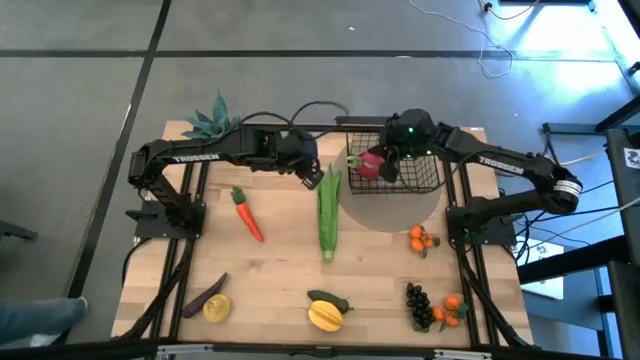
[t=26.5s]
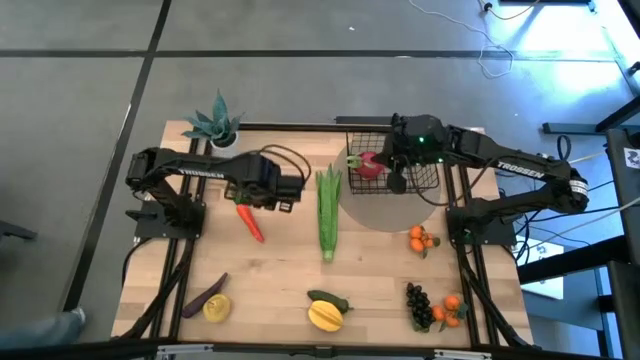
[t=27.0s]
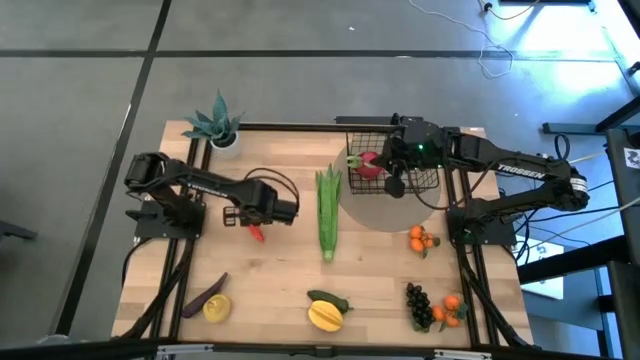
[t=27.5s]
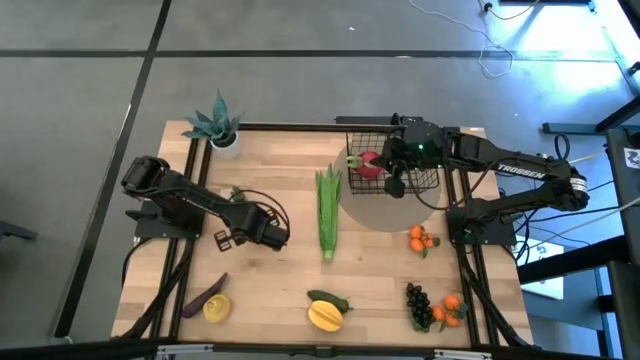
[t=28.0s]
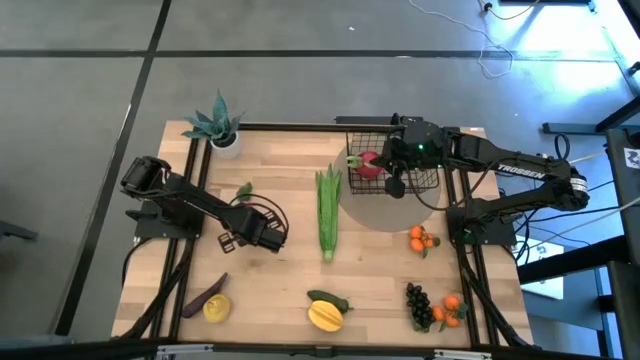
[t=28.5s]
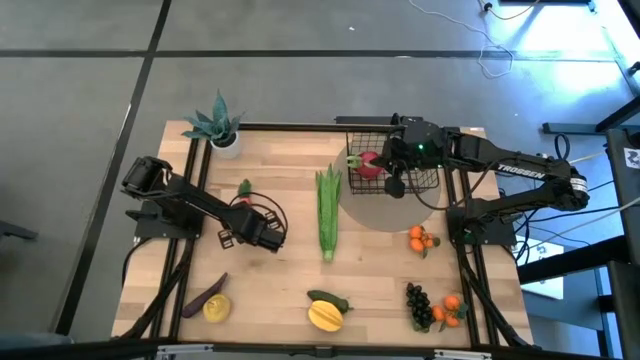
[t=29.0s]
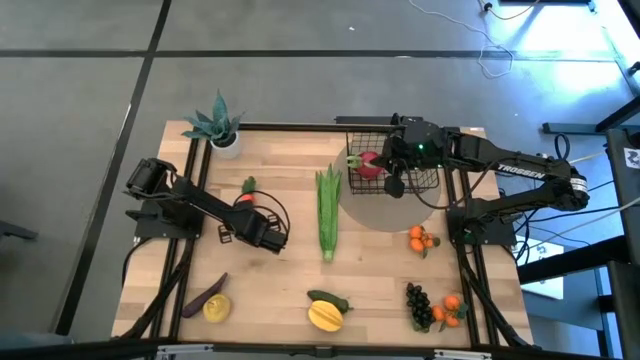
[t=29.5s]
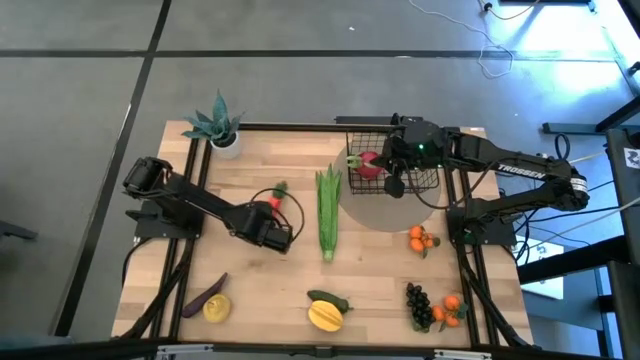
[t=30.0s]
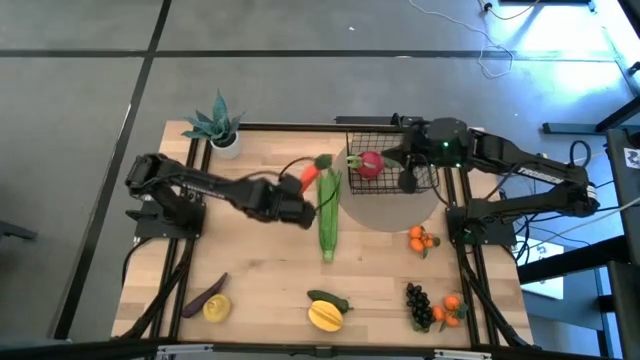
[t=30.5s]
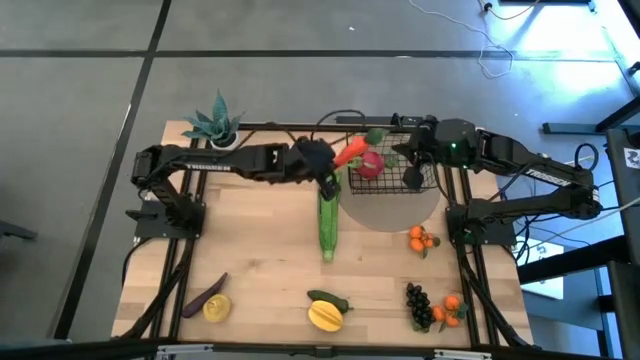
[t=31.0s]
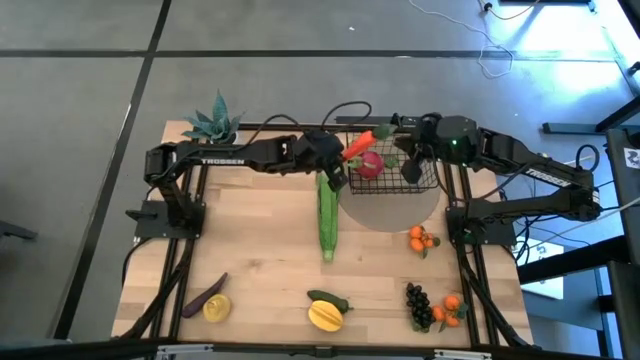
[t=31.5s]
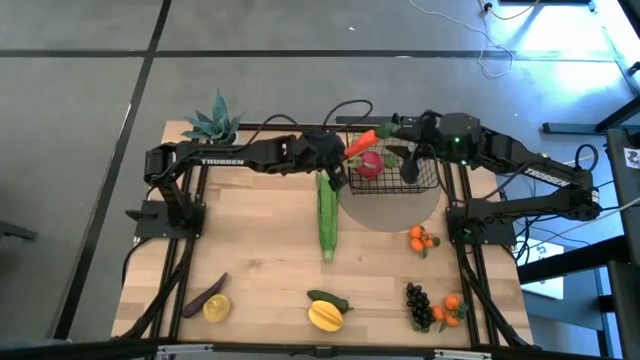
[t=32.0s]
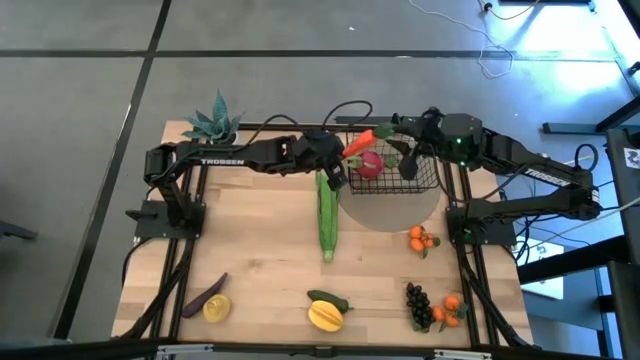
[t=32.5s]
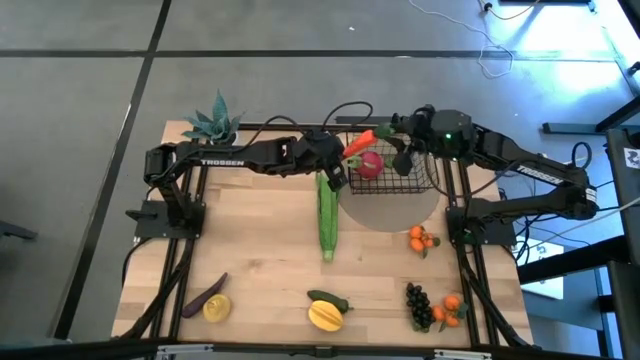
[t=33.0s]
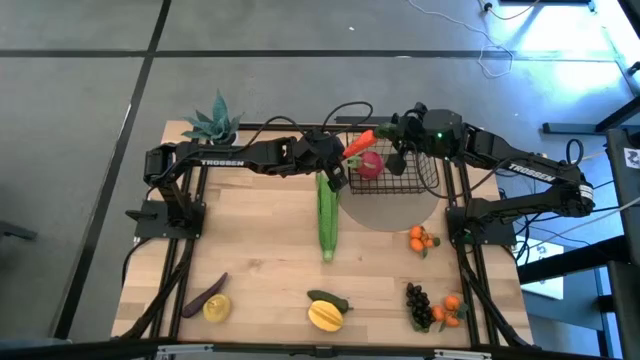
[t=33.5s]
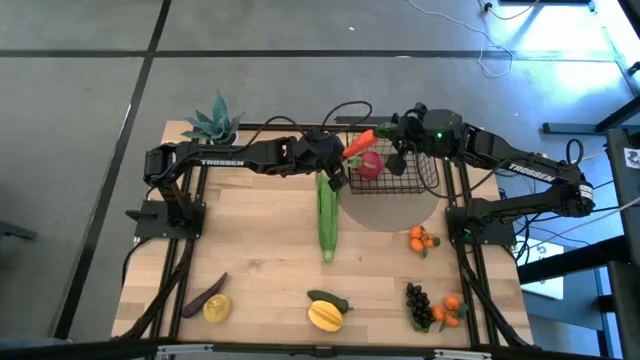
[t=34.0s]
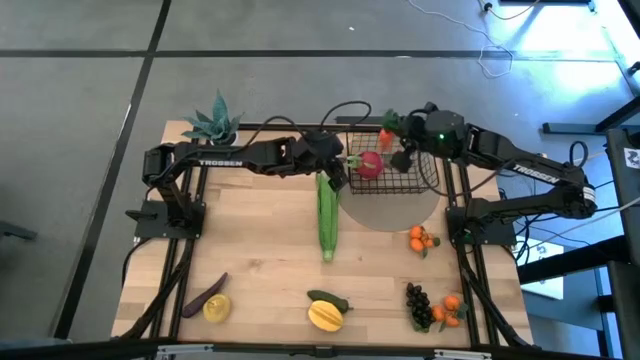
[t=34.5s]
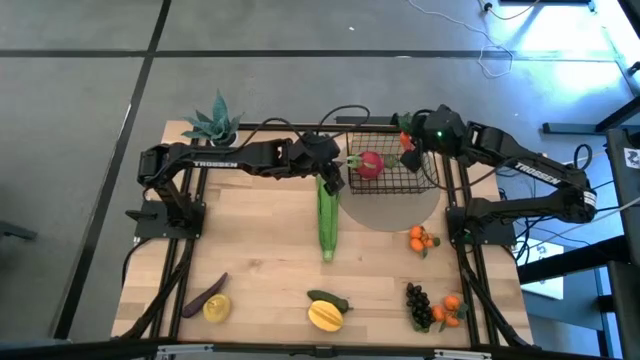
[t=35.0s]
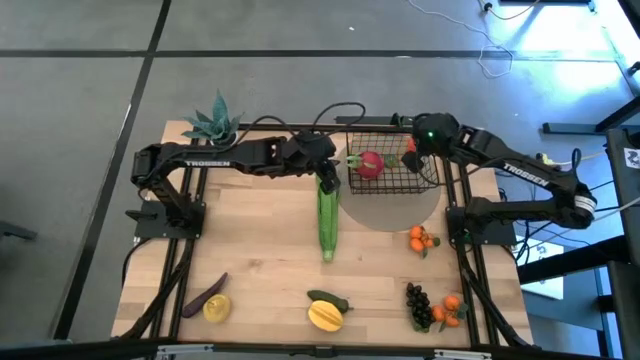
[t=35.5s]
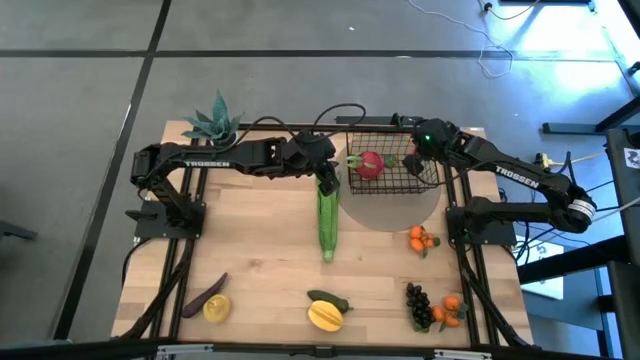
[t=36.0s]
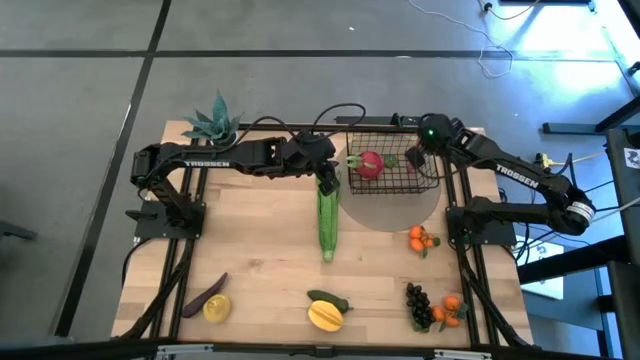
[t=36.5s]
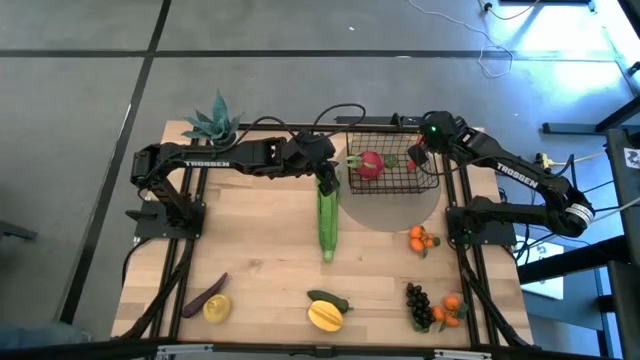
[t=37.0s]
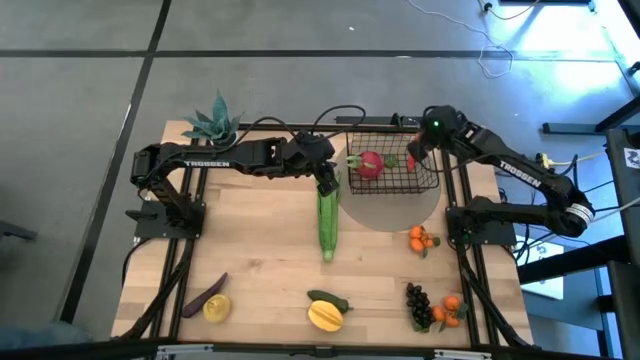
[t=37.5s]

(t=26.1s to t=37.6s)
Task: Build produce basket
Put the carrot into the black wire basket

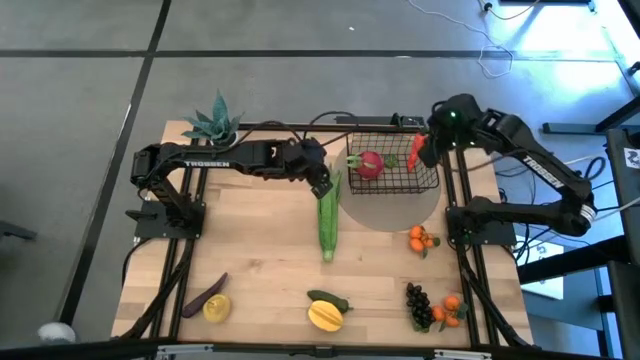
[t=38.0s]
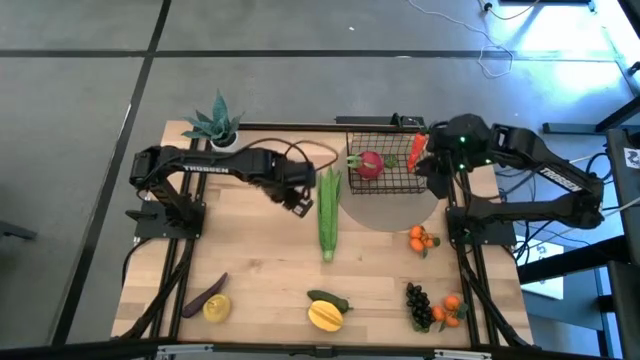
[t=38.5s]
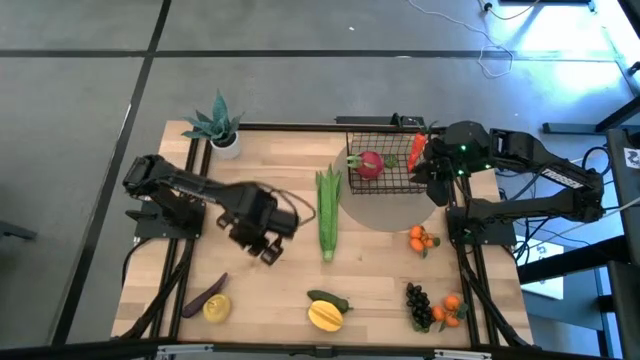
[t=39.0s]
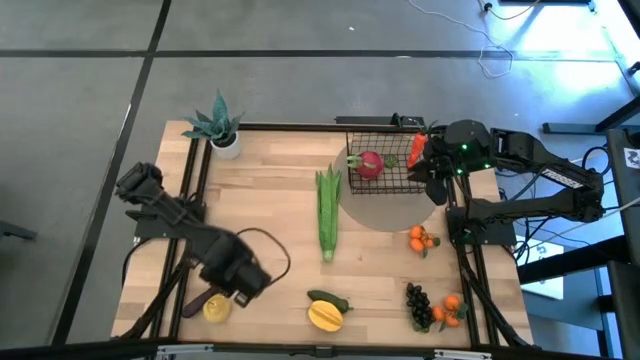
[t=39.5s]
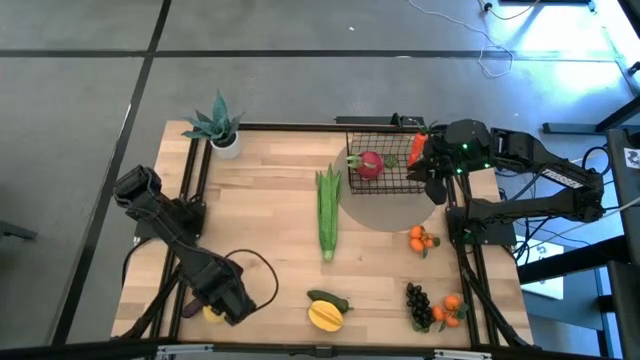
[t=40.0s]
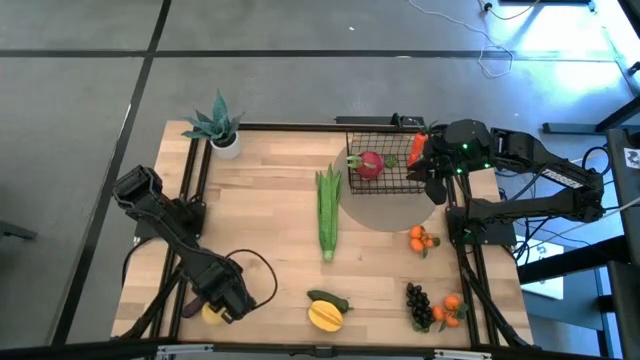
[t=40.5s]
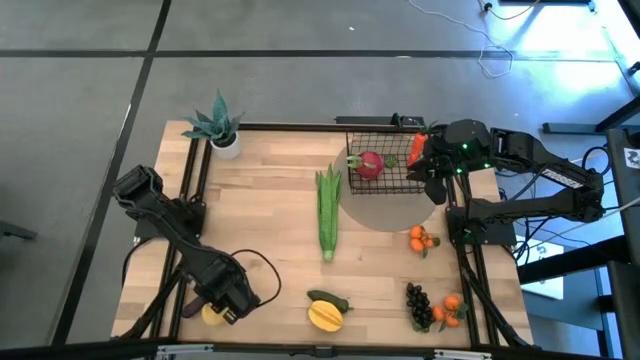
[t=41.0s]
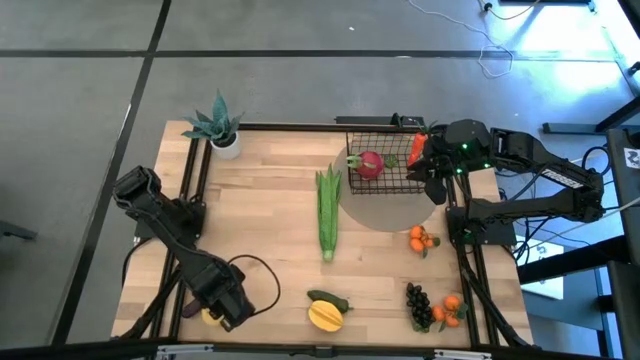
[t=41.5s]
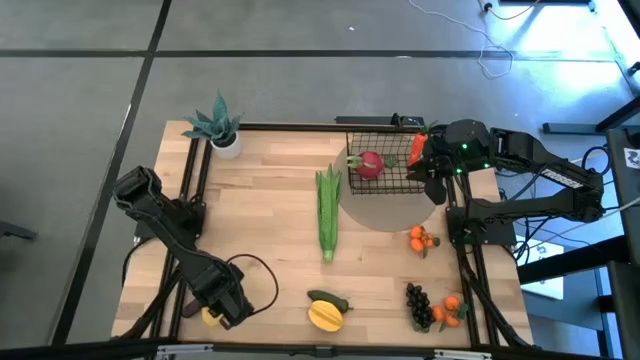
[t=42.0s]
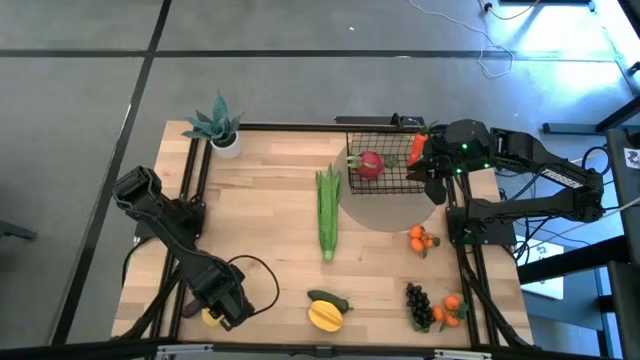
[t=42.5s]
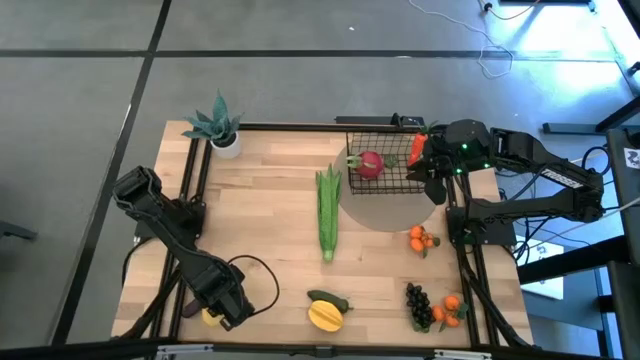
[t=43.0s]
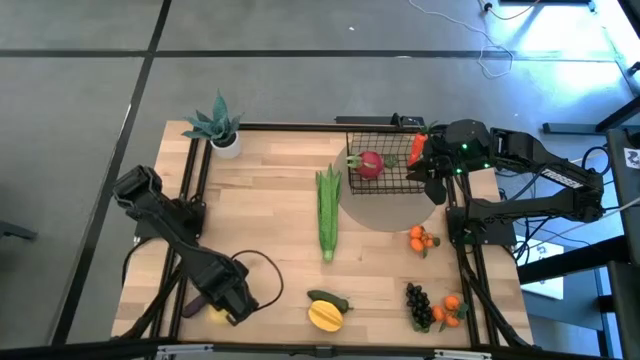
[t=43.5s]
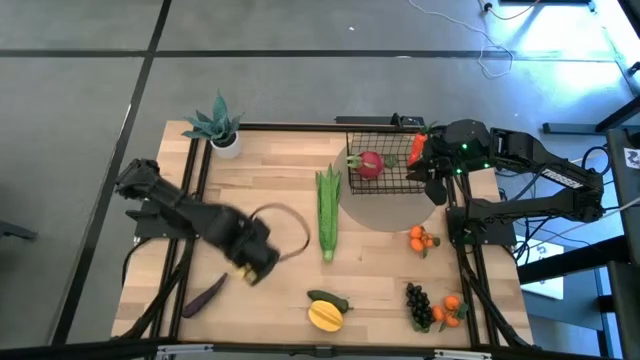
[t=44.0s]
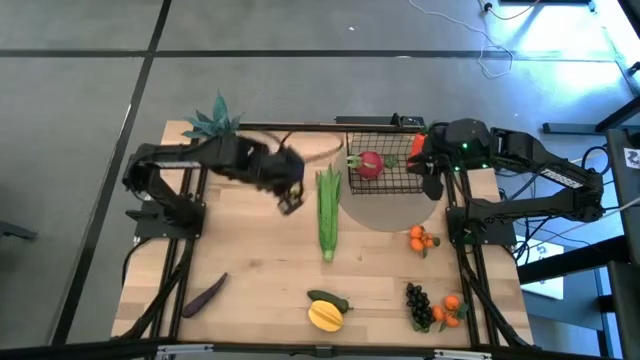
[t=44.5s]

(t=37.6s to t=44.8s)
Put the pear into the black wire basket
